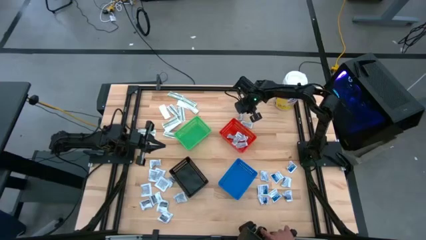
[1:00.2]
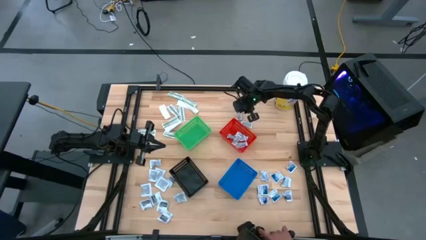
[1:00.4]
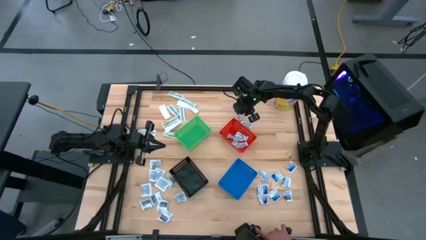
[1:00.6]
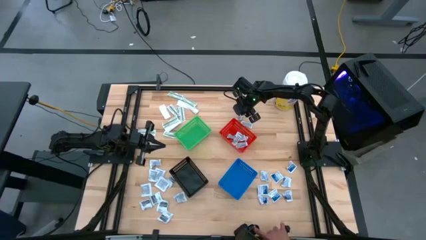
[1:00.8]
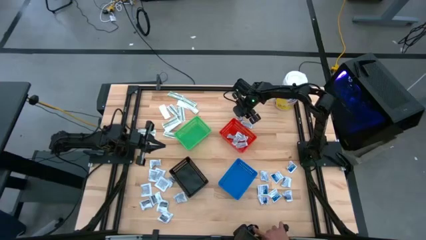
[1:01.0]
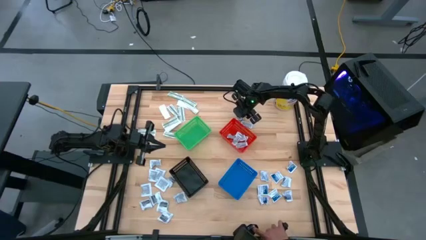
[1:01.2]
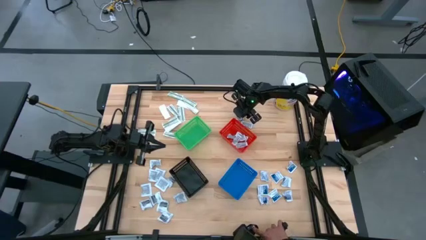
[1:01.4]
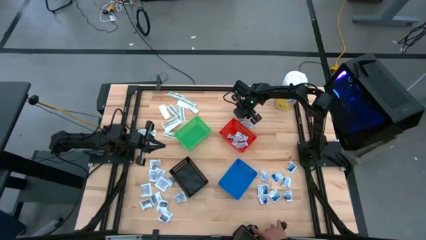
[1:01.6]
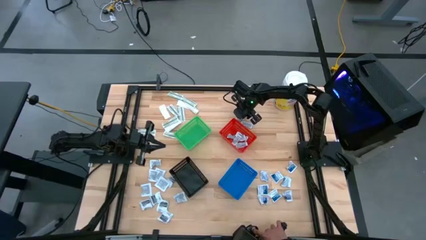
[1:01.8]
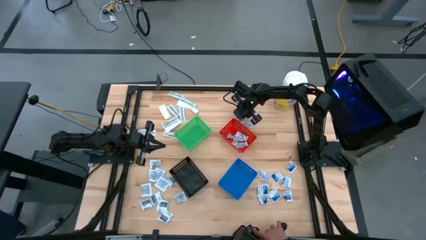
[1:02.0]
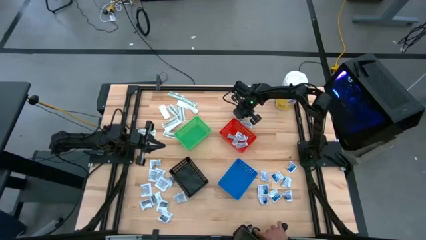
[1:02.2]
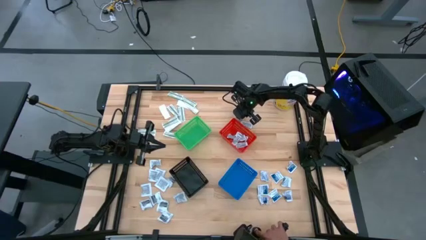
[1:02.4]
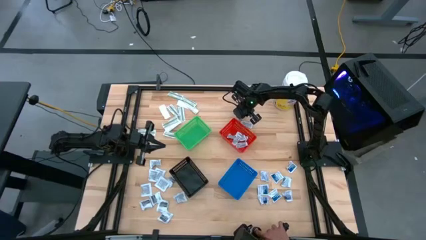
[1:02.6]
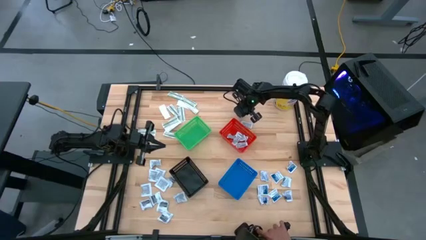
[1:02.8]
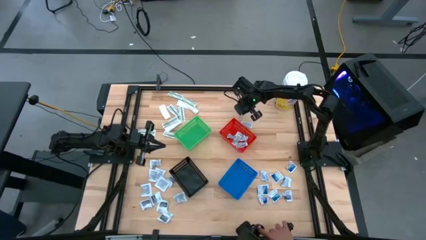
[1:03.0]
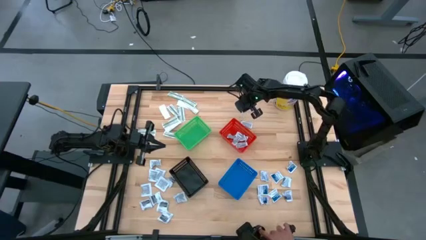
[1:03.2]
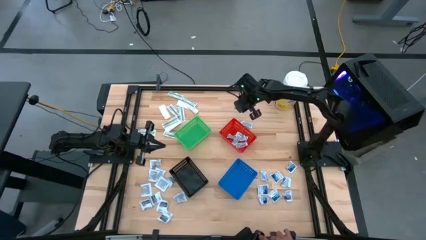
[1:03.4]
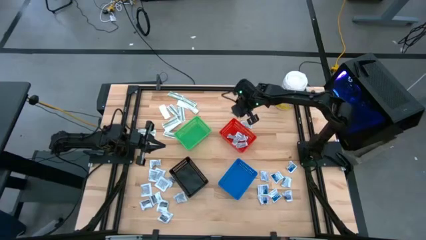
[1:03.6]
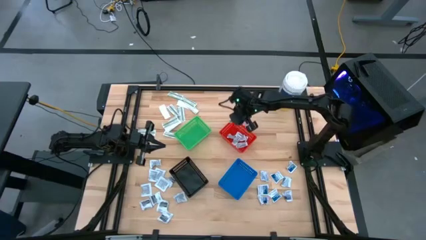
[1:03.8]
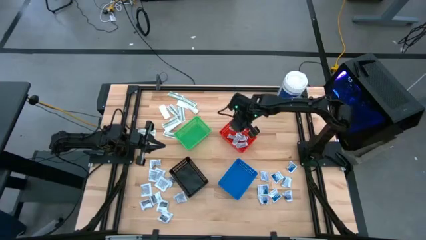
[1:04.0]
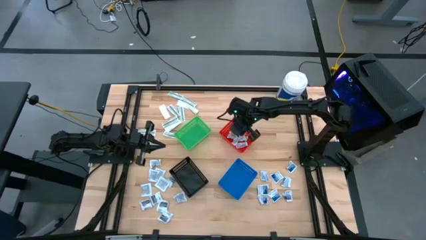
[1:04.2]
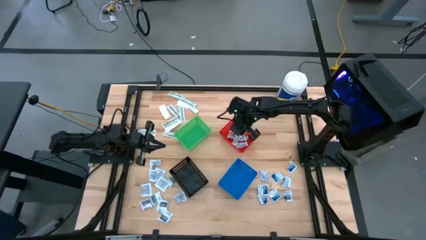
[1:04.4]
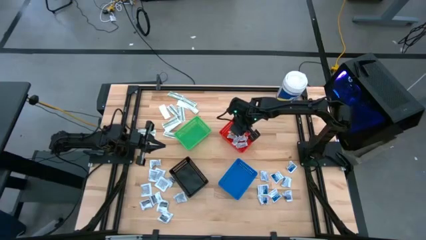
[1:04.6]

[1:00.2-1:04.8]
Task: Pick & Place First Aid Supplies
Put the orange ointment pack into the red bin

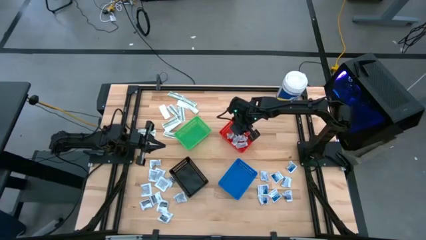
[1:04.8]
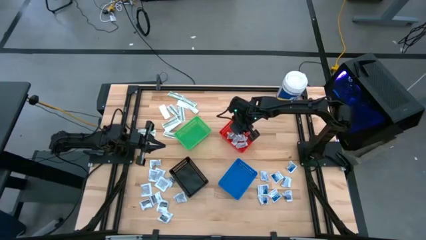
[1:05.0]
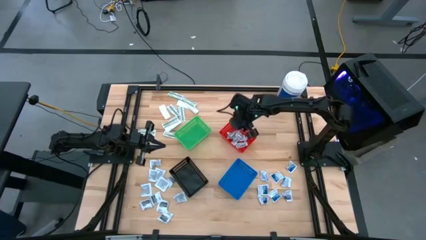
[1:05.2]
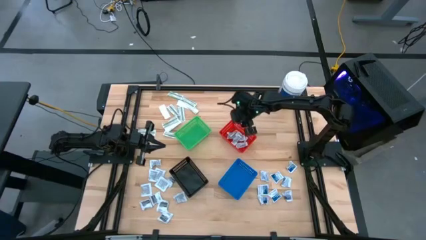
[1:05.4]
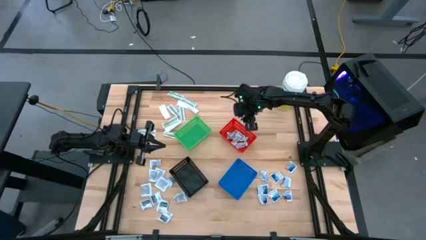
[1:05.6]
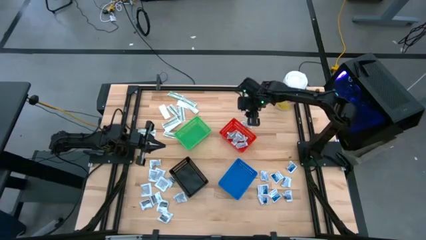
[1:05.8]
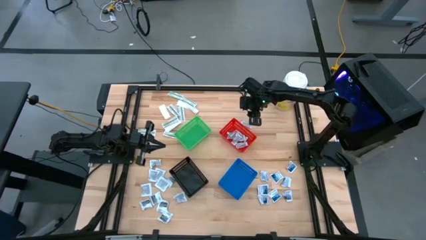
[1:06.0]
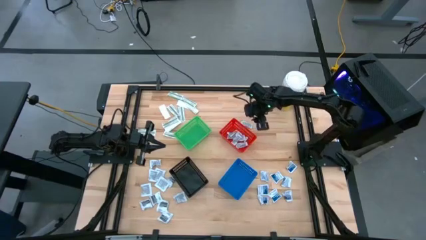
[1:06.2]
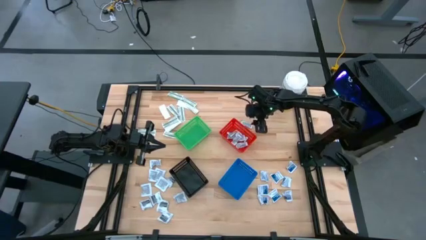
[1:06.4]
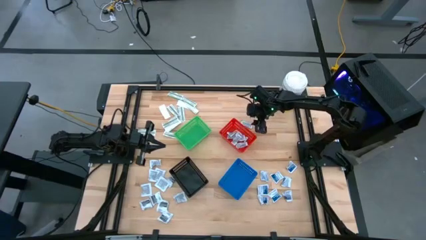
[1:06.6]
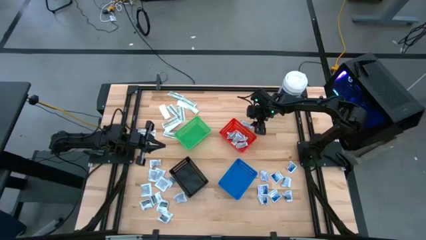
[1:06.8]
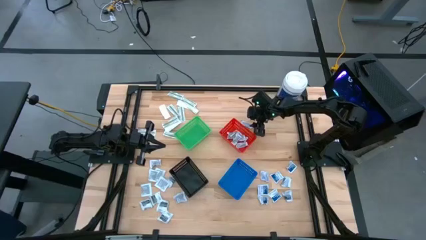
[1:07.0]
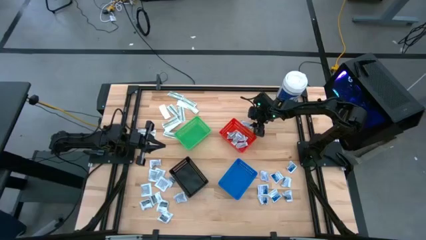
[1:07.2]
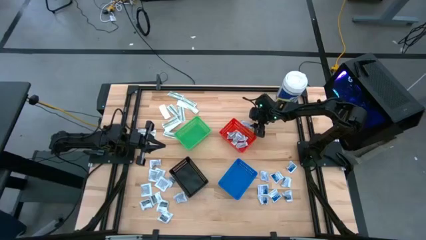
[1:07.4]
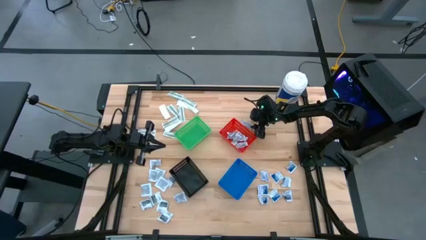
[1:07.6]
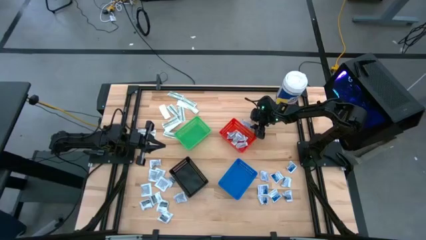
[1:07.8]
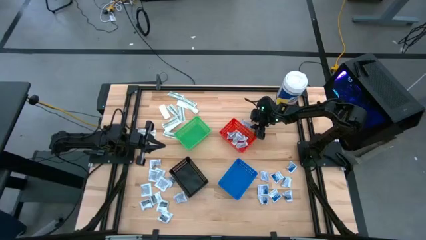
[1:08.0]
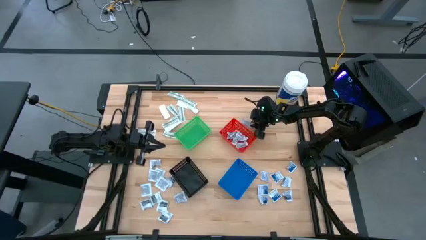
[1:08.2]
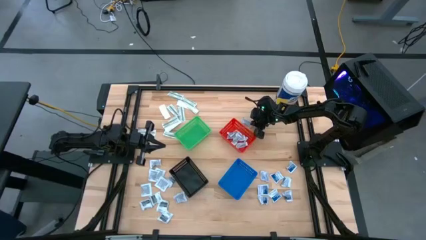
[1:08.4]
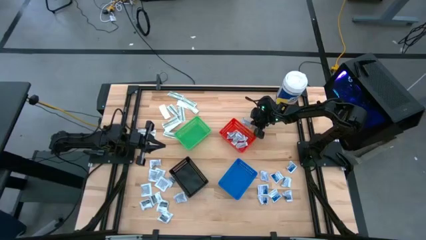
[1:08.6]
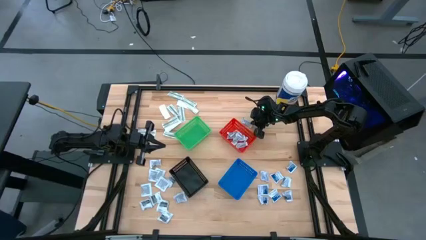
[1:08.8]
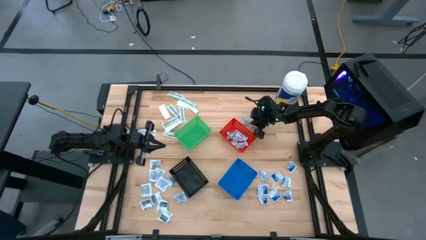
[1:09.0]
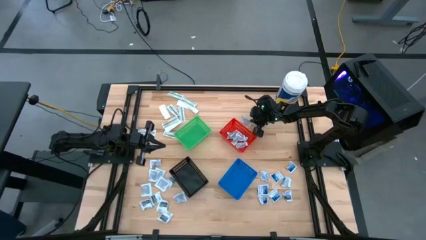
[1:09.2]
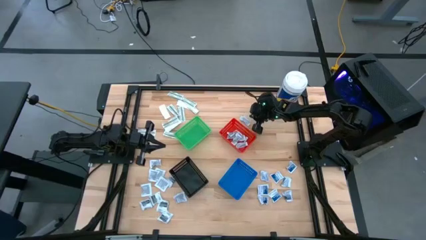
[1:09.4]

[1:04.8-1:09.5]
Put the orange ointment pack into the red bin

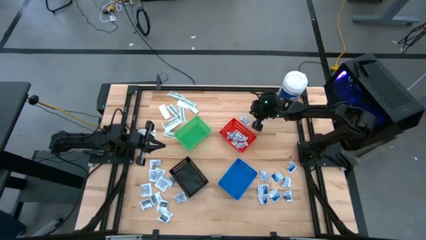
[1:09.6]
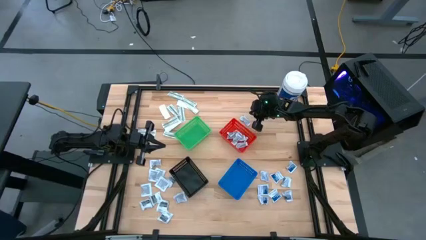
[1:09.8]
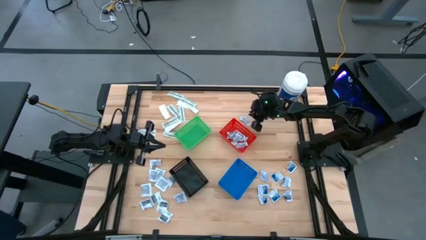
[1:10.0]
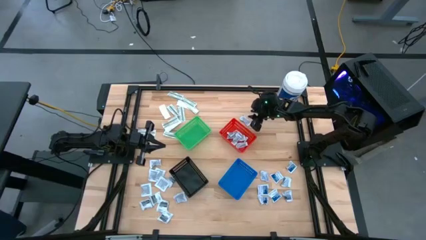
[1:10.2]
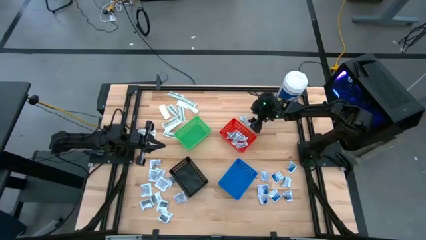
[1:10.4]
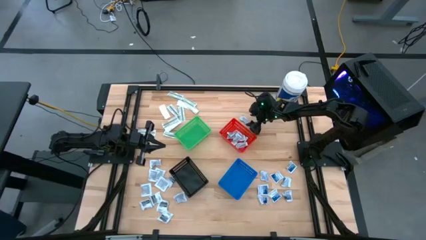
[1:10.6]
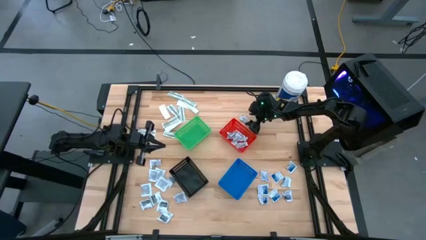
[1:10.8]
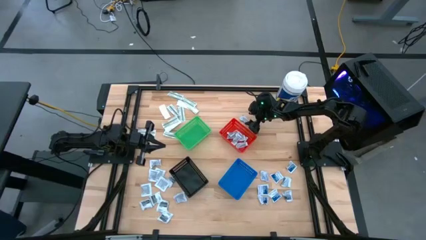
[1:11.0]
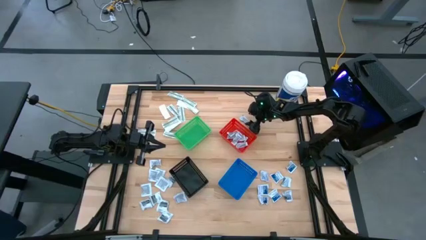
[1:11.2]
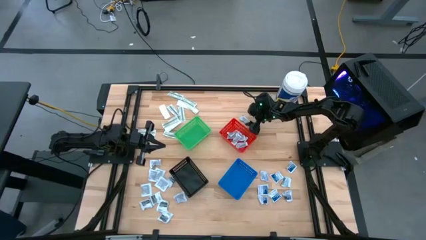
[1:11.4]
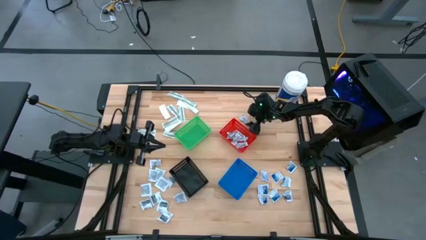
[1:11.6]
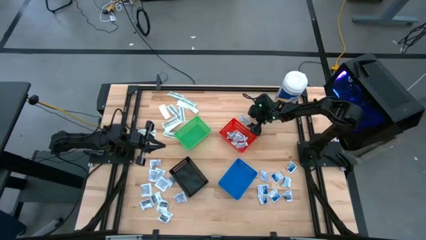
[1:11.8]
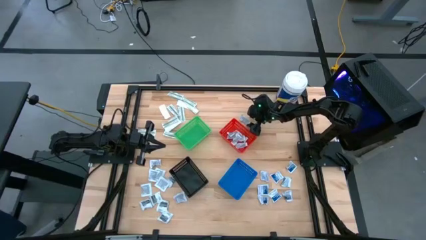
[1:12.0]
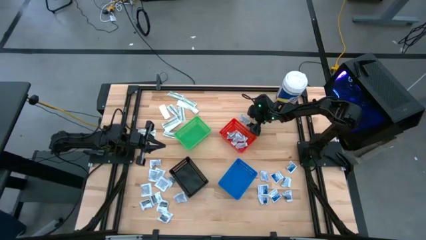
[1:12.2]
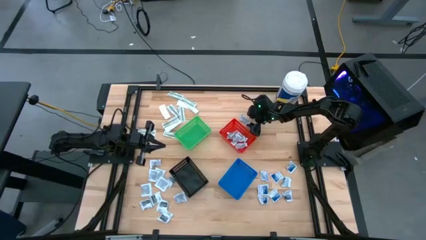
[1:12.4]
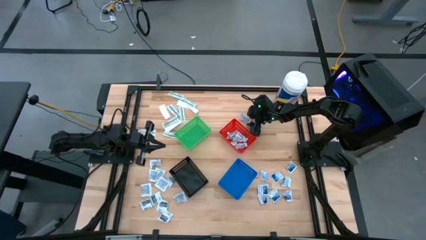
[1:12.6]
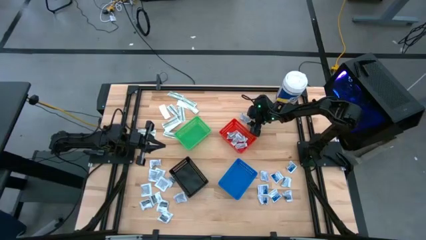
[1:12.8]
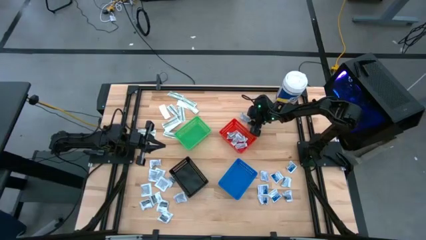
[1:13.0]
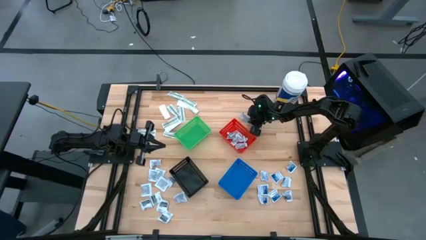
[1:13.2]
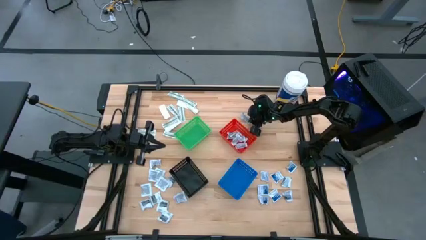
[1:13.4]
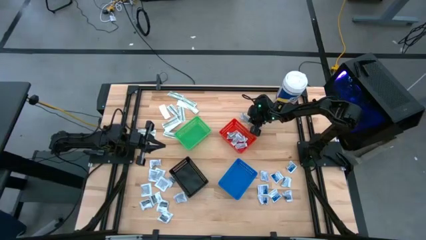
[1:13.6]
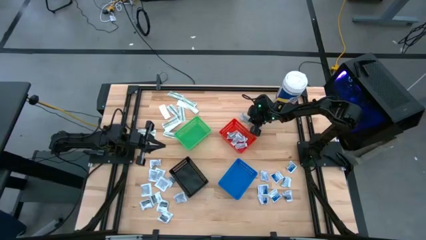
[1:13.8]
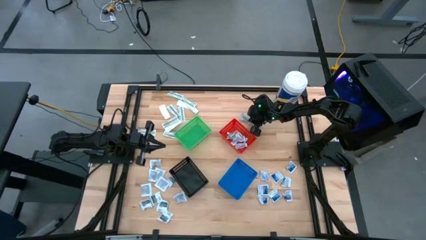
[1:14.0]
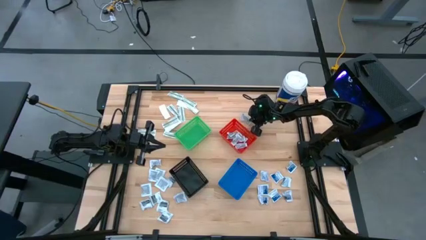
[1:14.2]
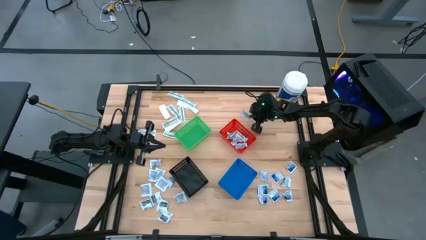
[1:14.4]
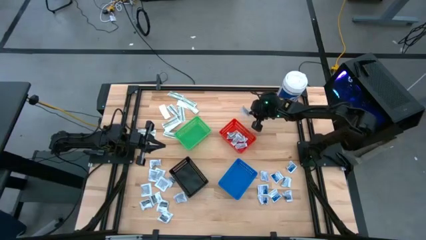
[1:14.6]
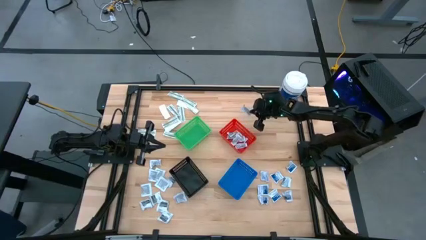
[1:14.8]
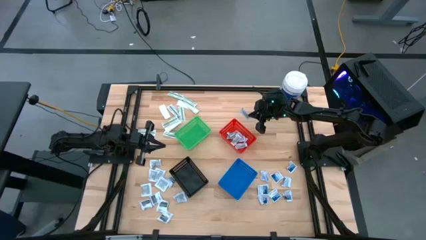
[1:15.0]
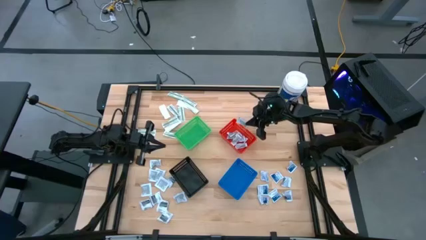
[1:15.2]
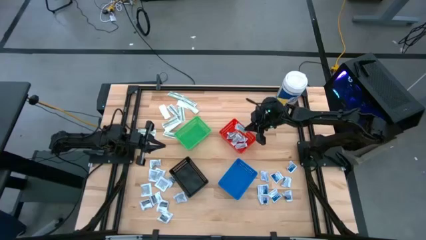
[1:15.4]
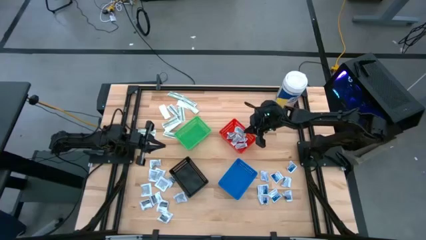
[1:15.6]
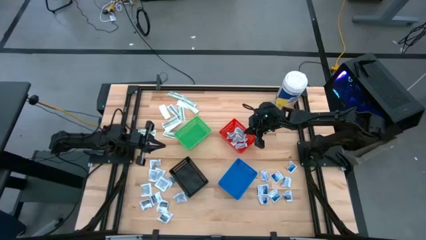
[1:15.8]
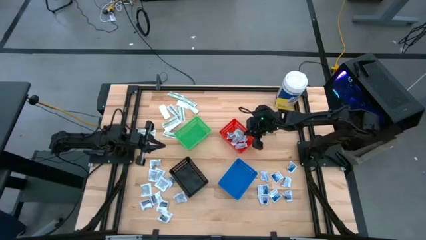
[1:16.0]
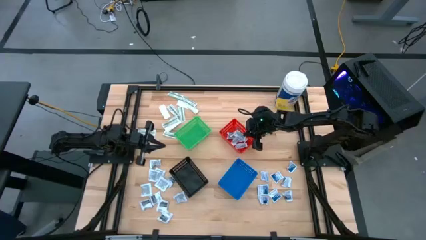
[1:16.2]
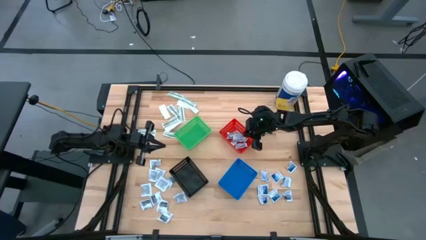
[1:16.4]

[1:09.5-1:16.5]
Put the orange ointment pack into the red bin
